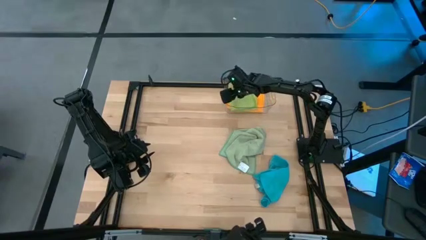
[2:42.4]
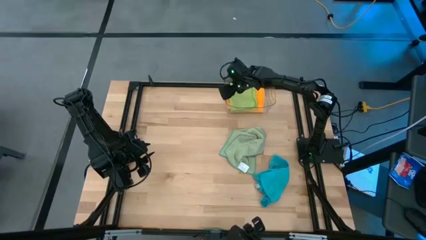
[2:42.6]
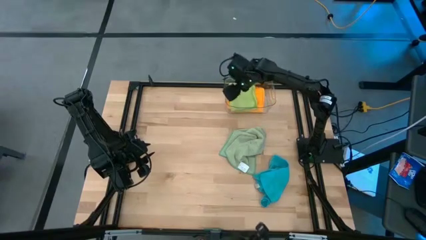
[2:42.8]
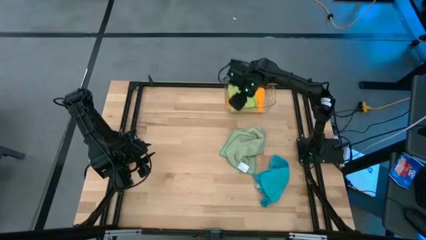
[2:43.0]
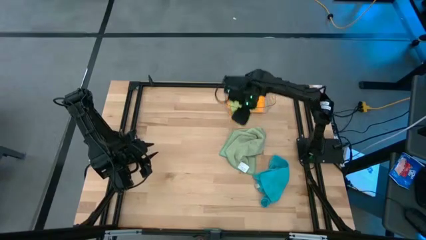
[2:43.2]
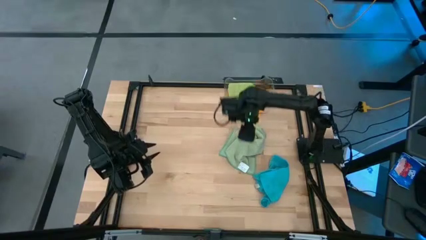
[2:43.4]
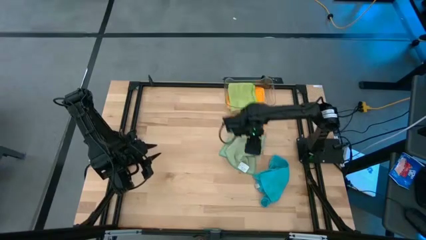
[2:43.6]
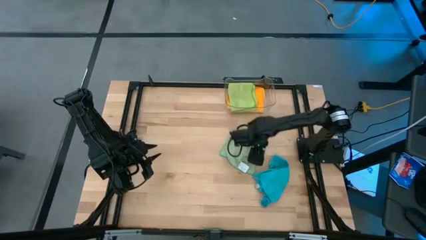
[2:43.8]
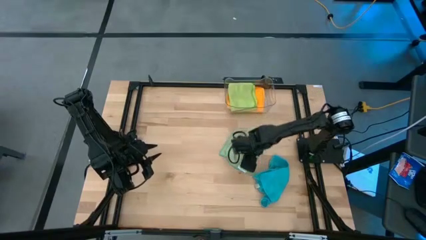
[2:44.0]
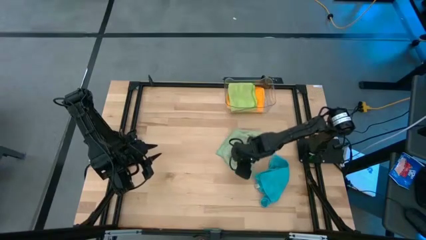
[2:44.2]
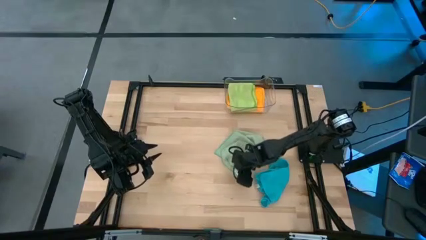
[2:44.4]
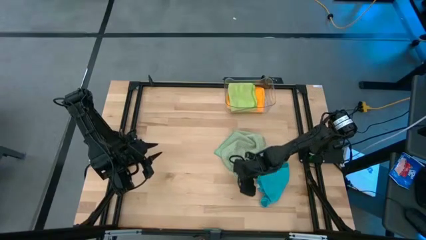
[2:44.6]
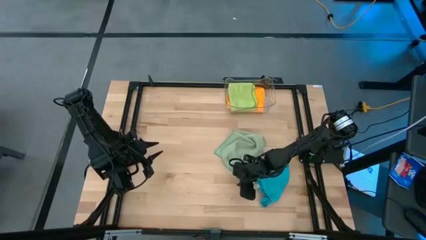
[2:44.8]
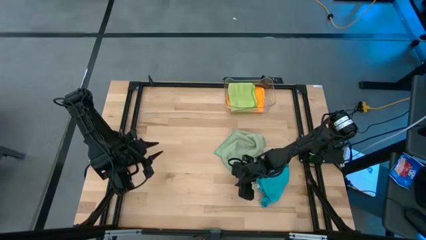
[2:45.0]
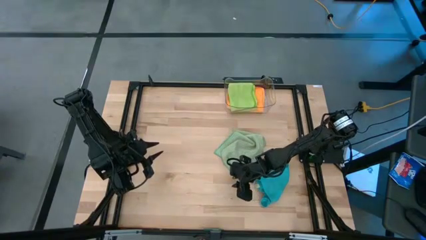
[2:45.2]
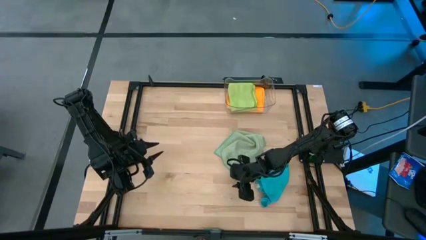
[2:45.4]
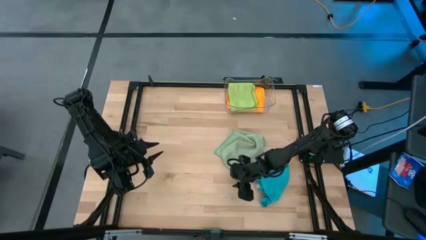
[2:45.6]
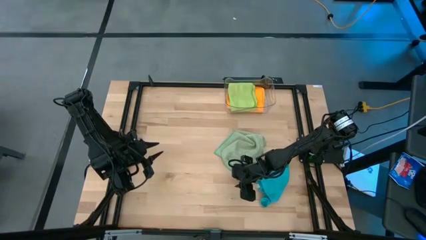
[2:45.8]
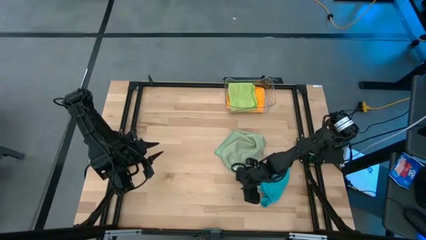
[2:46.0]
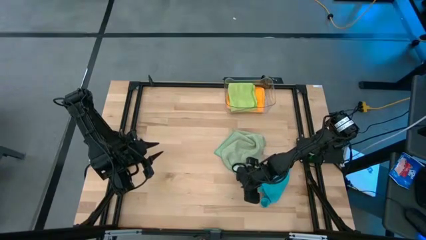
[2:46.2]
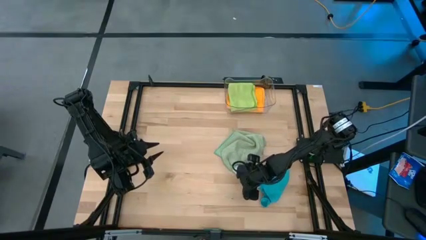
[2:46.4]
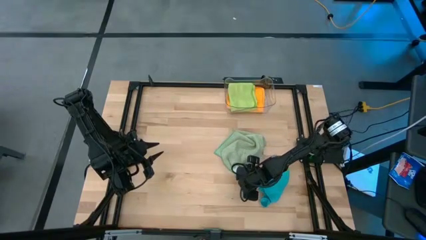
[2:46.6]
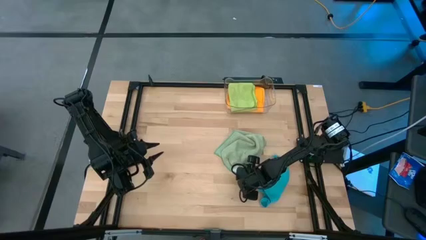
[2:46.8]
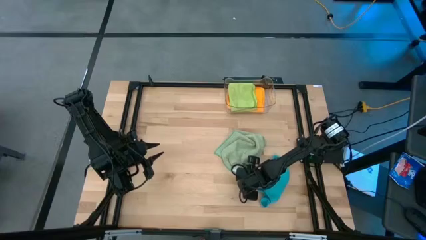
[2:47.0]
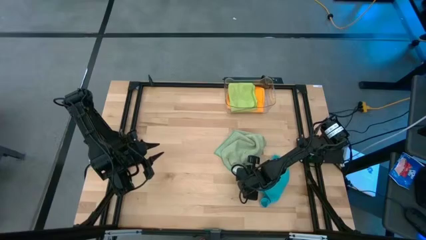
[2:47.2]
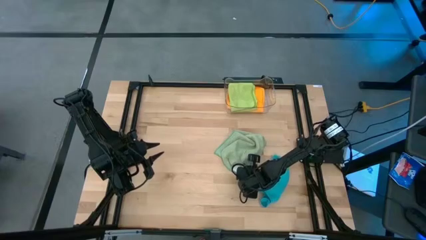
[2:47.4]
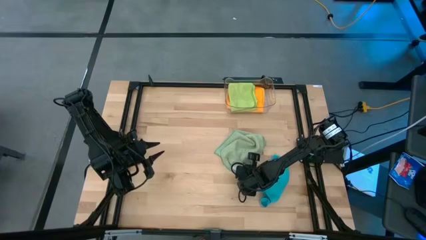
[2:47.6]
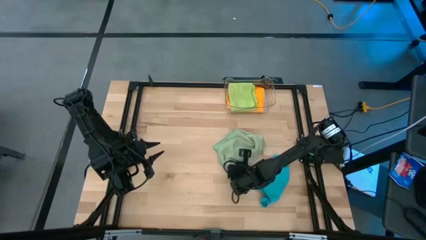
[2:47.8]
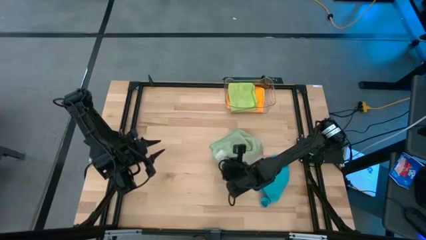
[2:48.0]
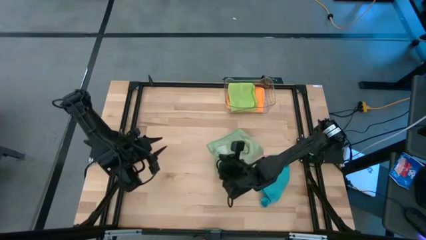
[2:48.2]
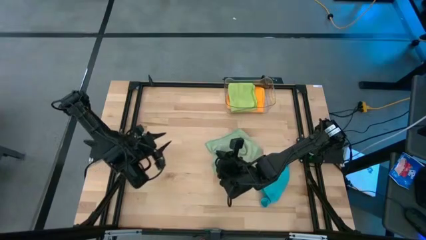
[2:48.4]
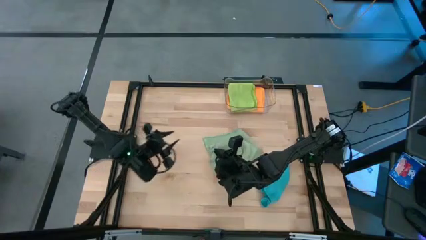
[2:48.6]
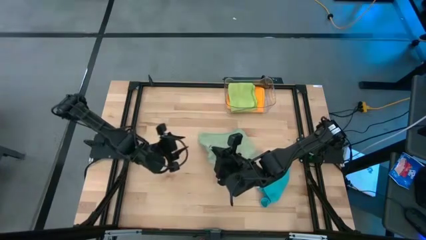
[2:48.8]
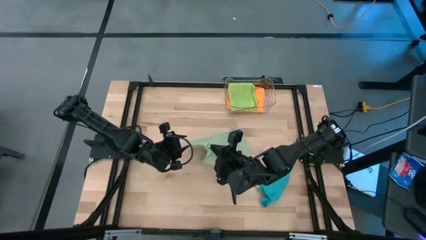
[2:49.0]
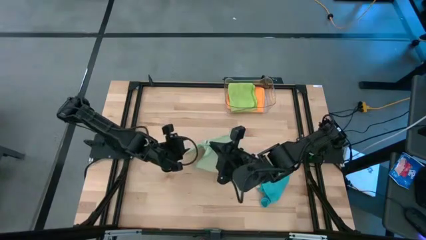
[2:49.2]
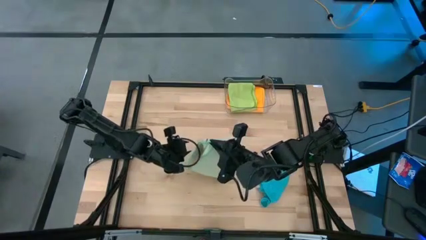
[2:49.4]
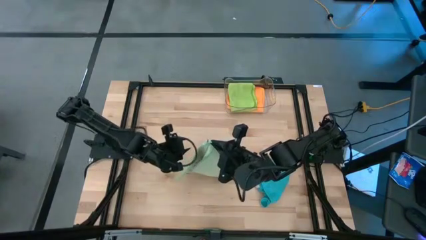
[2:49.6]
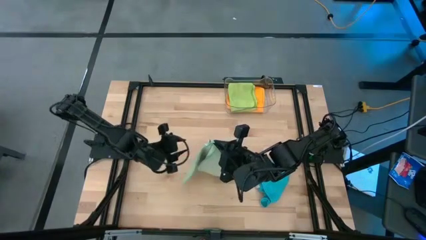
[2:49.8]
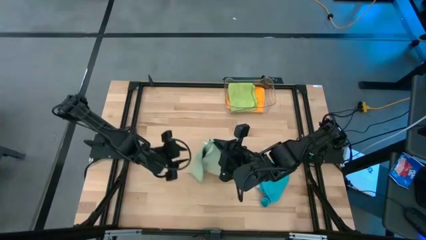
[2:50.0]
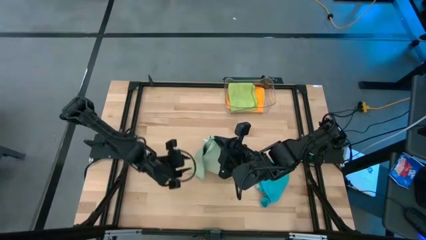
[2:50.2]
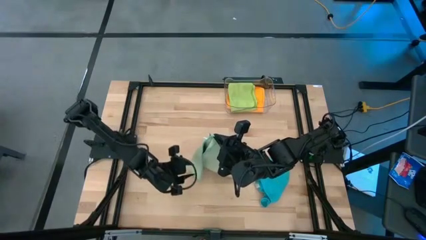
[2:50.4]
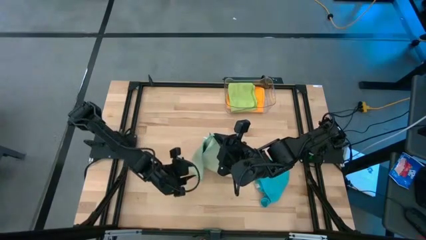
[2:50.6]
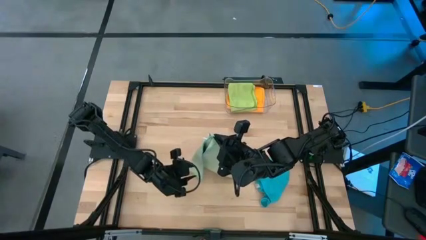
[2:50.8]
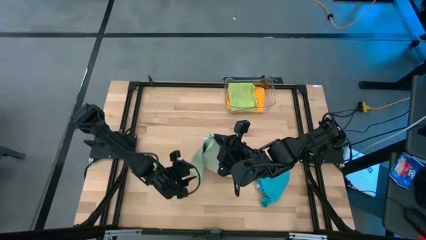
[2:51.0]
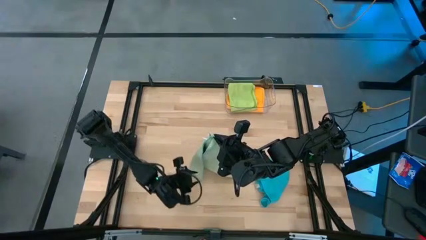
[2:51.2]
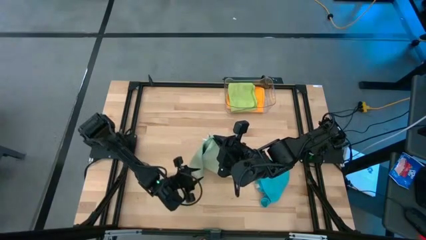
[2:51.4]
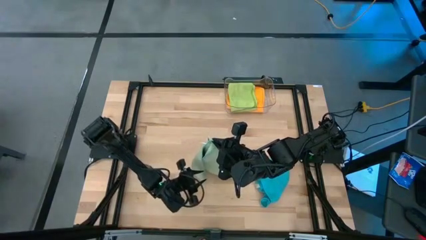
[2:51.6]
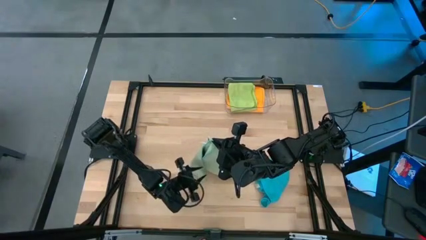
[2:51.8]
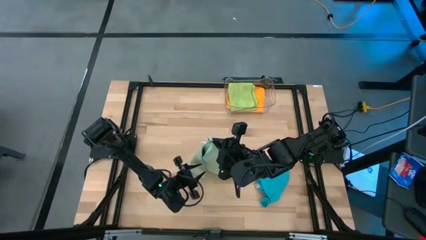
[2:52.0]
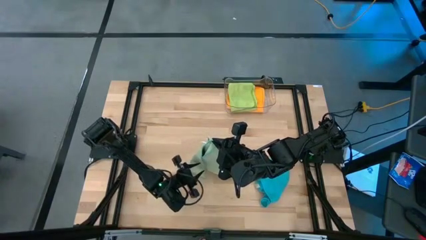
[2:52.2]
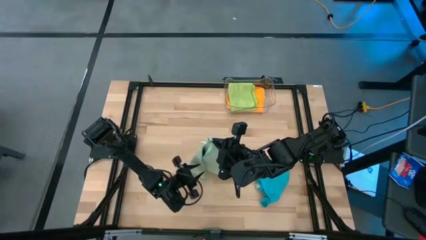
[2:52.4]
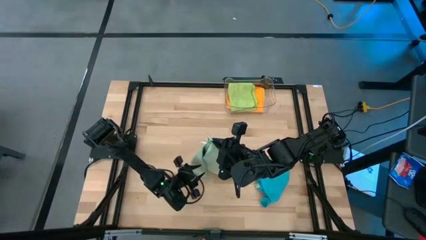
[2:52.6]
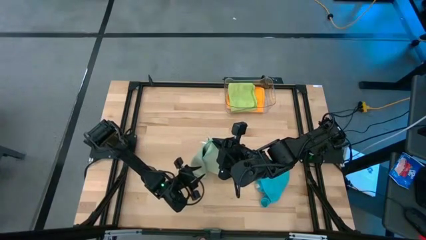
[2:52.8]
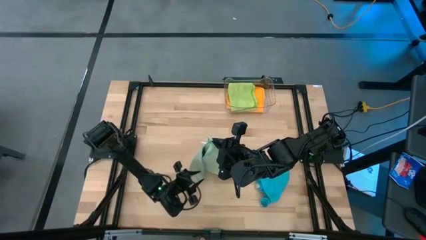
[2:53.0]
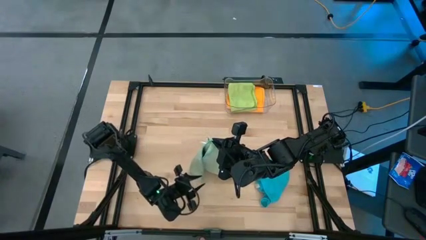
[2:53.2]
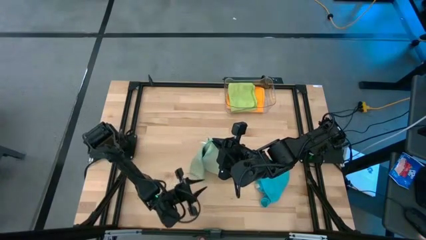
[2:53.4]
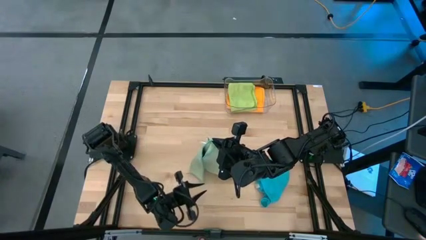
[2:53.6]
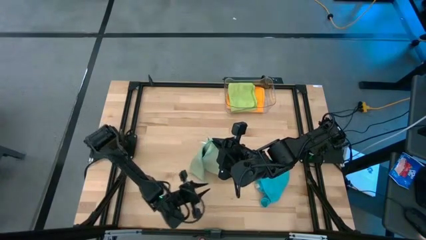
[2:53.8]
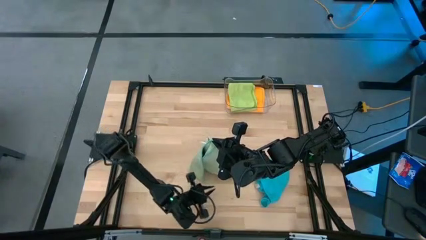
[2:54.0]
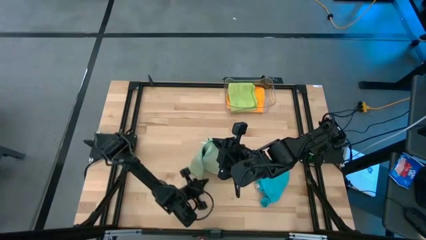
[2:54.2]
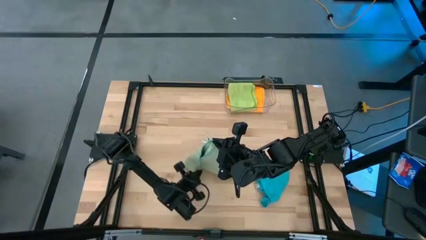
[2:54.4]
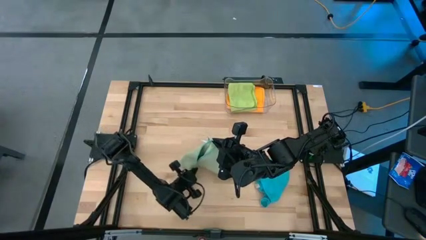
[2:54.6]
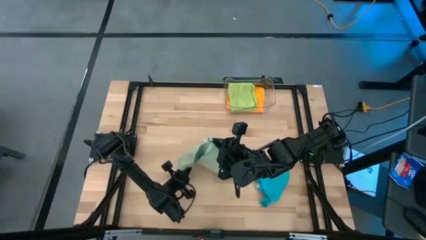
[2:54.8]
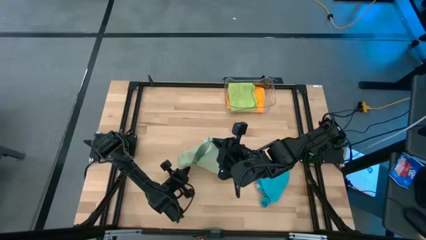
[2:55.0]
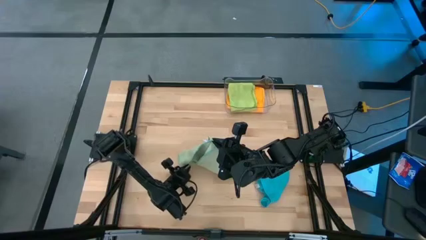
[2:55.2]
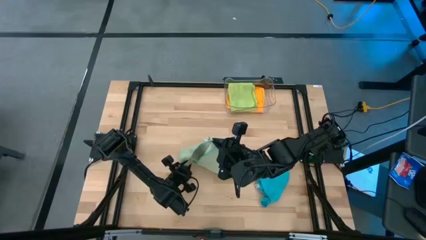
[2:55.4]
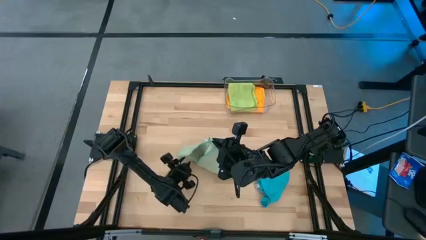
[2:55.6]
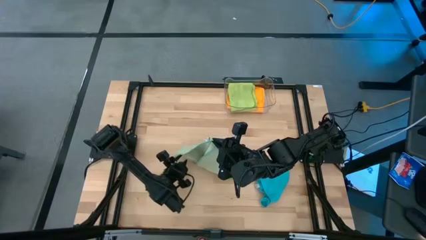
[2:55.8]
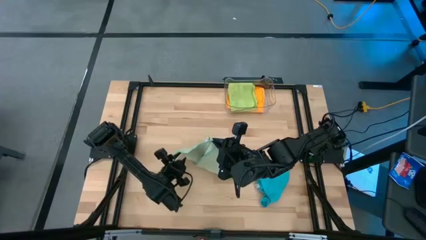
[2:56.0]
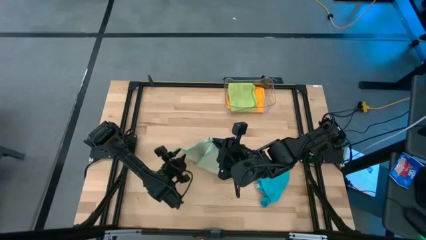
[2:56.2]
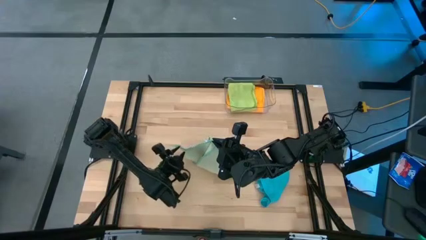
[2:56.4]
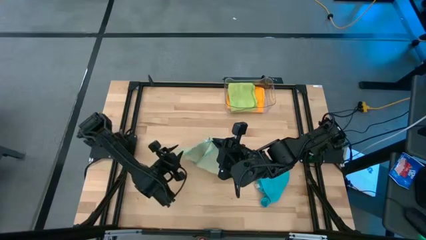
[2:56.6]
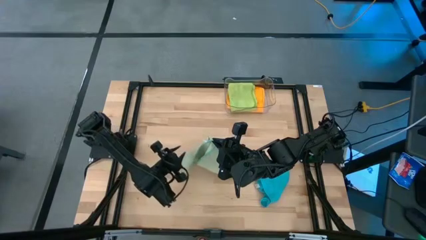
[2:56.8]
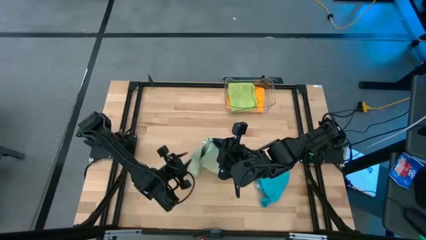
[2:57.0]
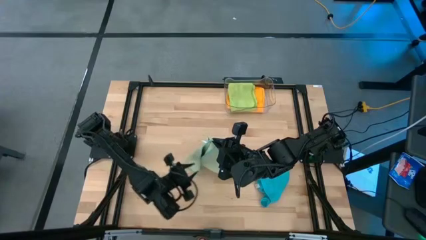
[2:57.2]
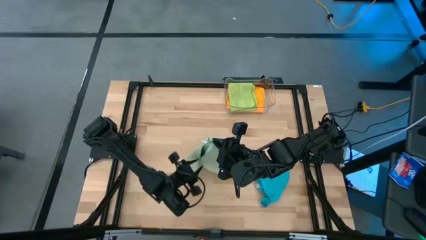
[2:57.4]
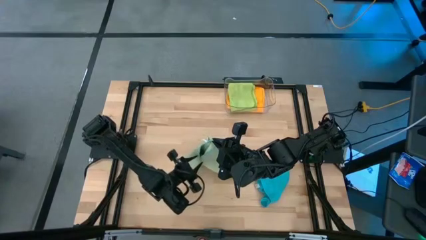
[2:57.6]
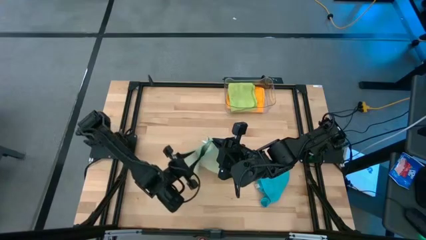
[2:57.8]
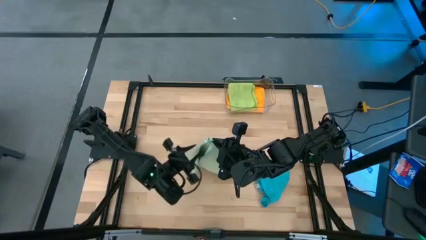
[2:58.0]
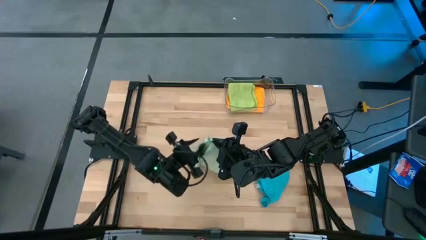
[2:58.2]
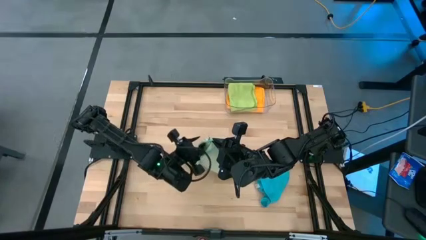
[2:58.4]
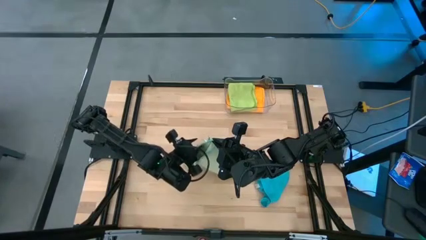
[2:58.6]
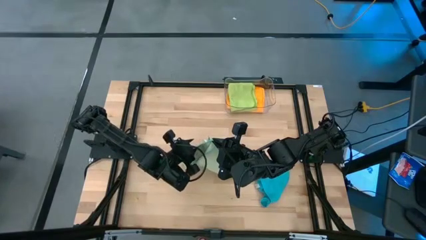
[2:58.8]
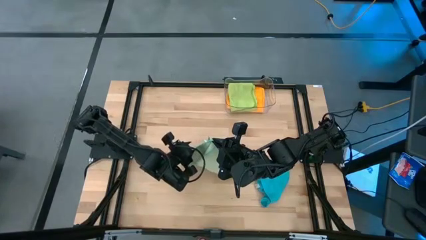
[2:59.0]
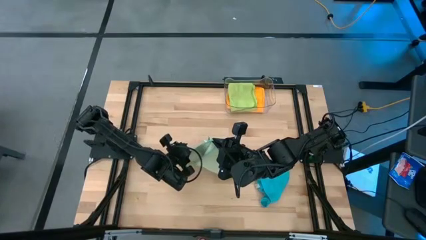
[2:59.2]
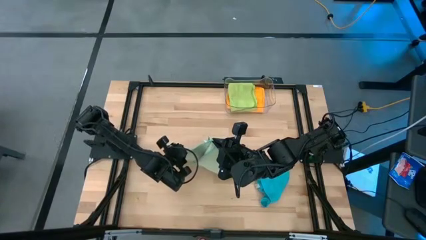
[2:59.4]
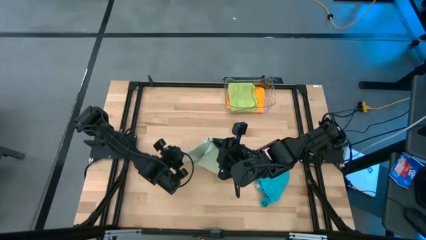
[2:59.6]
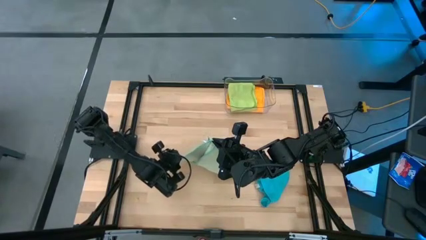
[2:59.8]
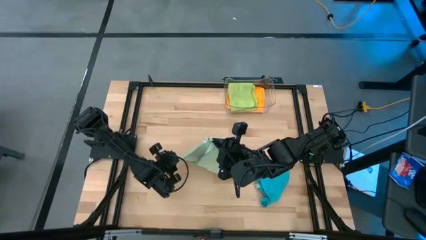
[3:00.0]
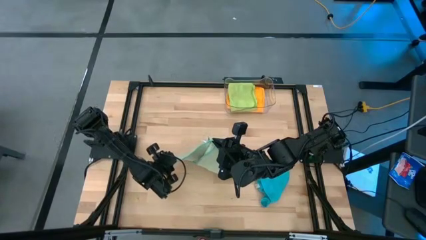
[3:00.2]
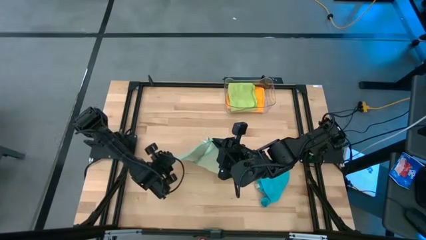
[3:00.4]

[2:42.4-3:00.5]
Task: Fold microfiber towels
Fold the green microfiber towel
